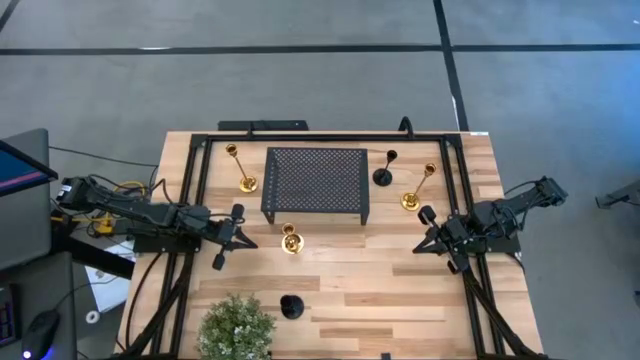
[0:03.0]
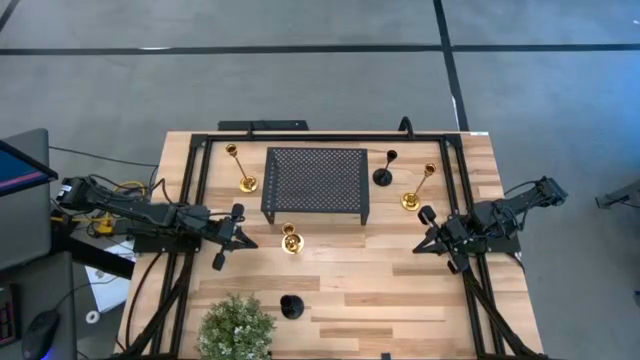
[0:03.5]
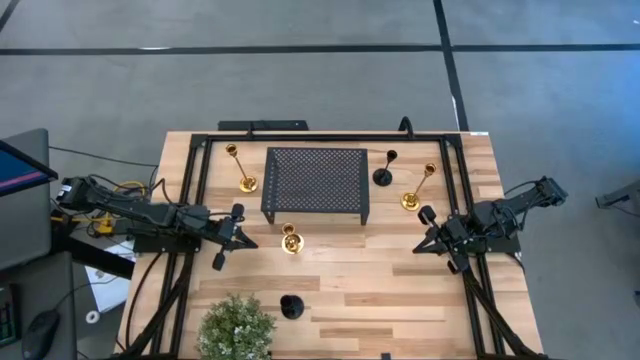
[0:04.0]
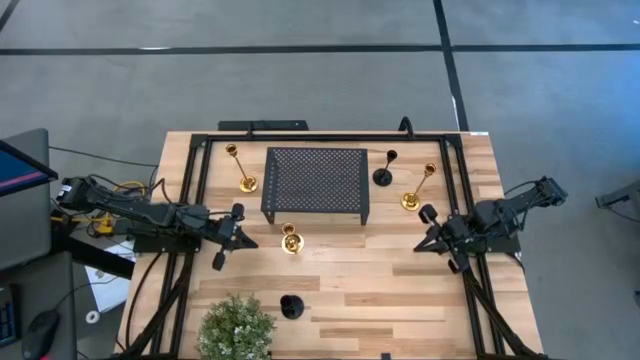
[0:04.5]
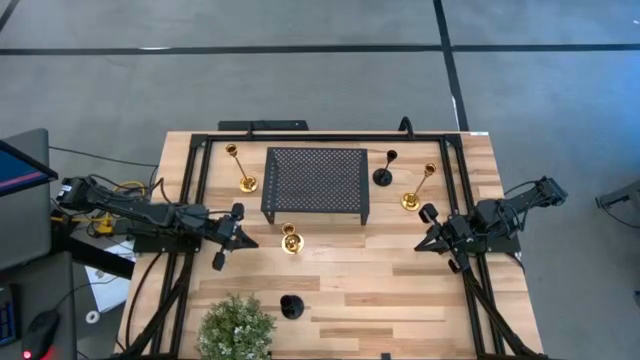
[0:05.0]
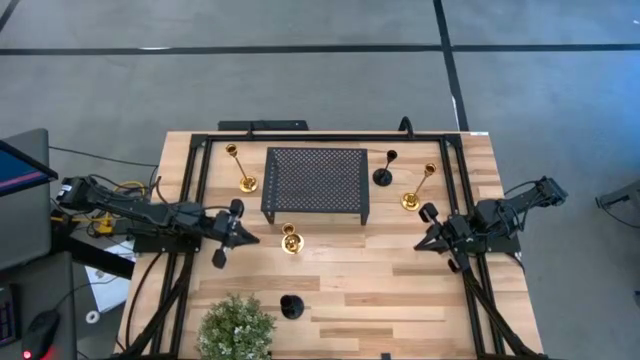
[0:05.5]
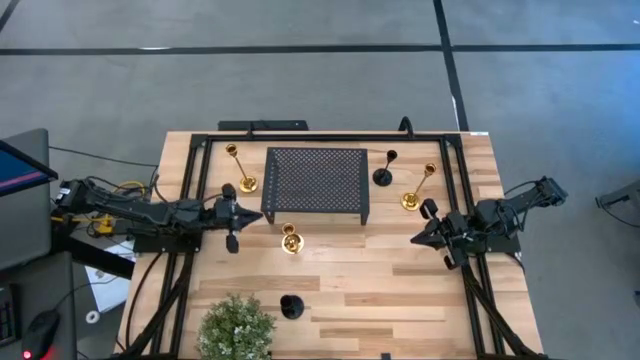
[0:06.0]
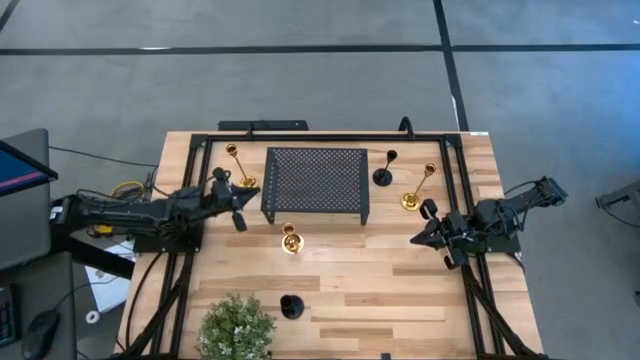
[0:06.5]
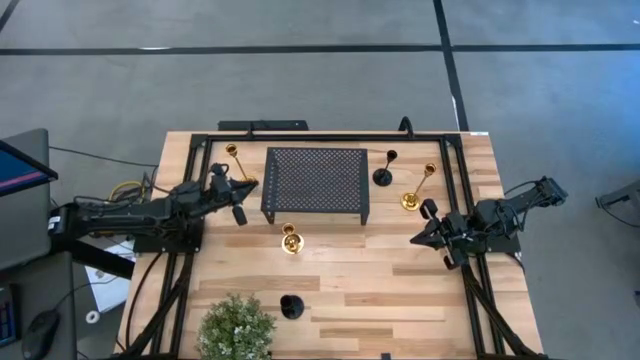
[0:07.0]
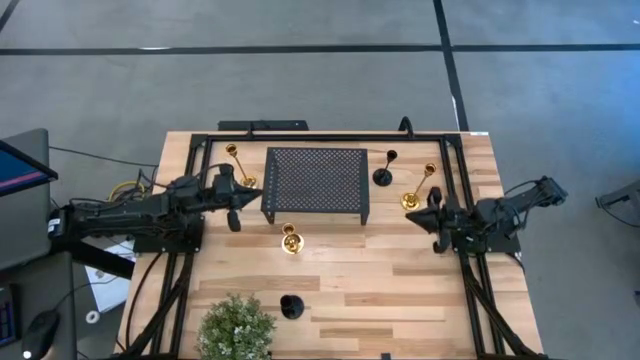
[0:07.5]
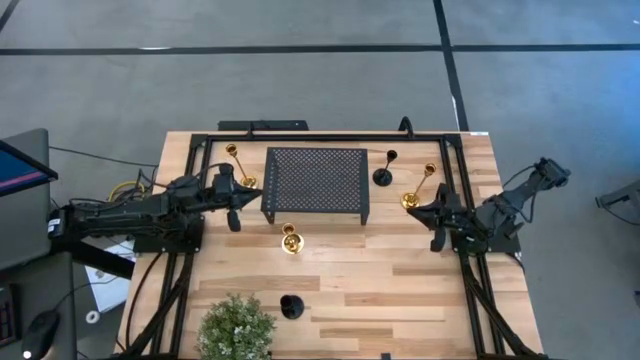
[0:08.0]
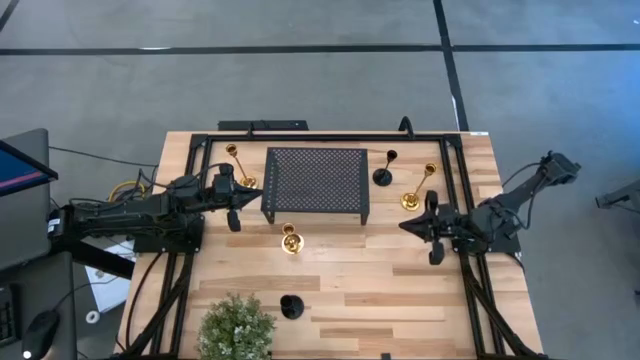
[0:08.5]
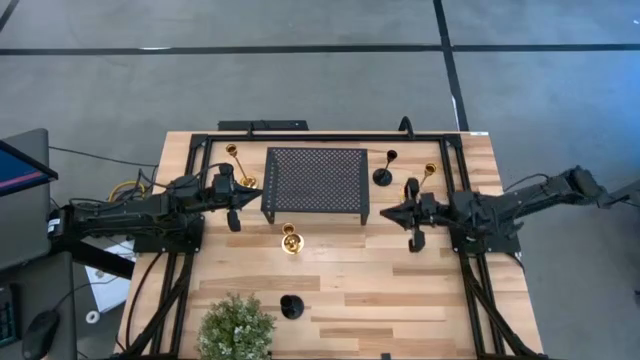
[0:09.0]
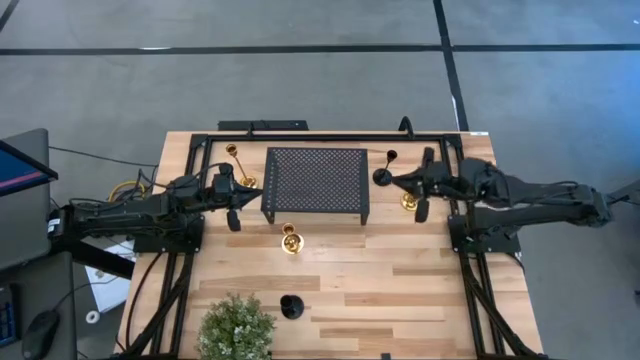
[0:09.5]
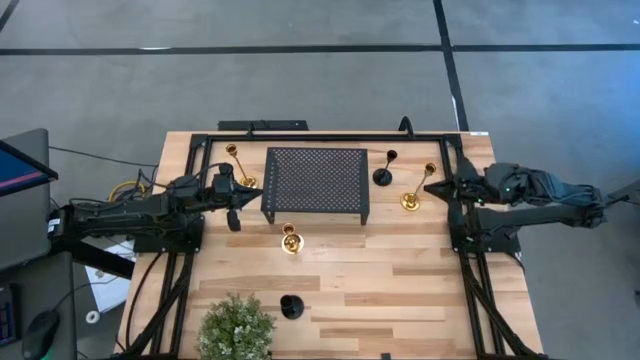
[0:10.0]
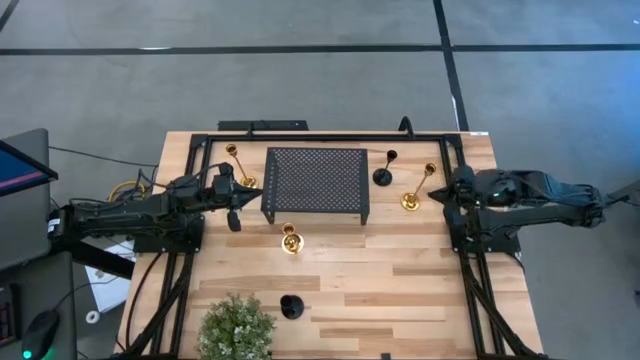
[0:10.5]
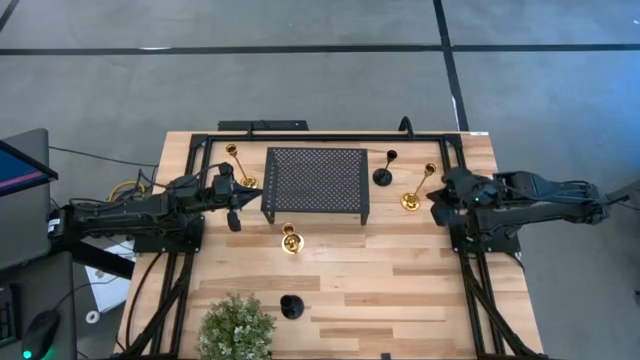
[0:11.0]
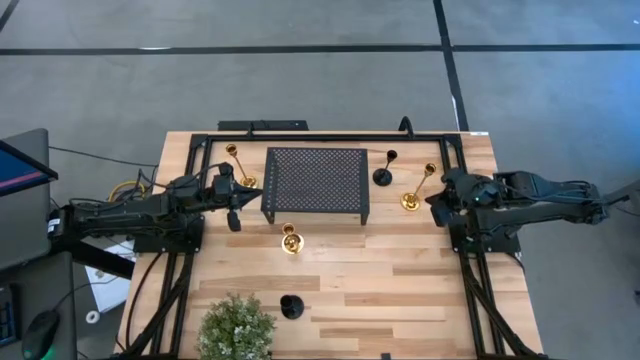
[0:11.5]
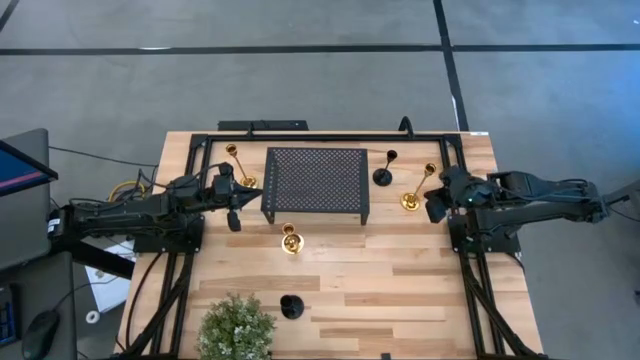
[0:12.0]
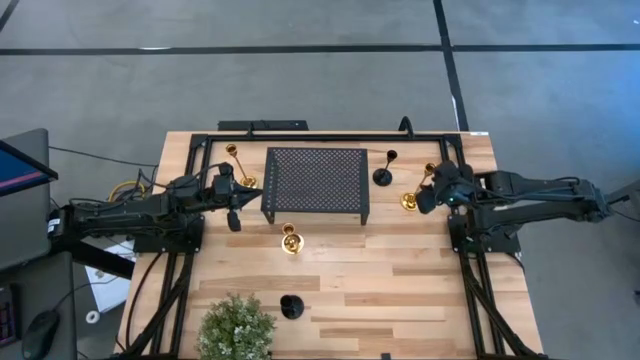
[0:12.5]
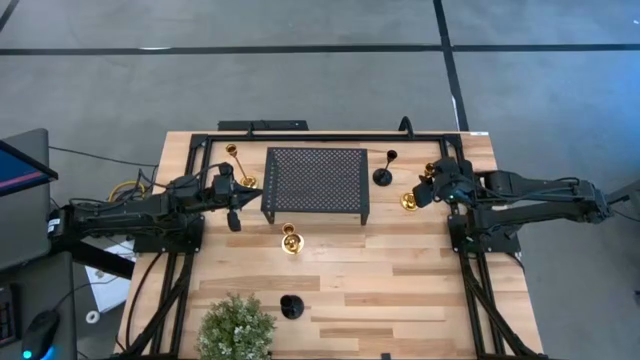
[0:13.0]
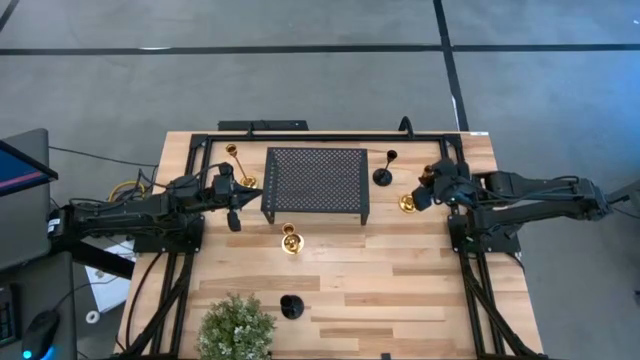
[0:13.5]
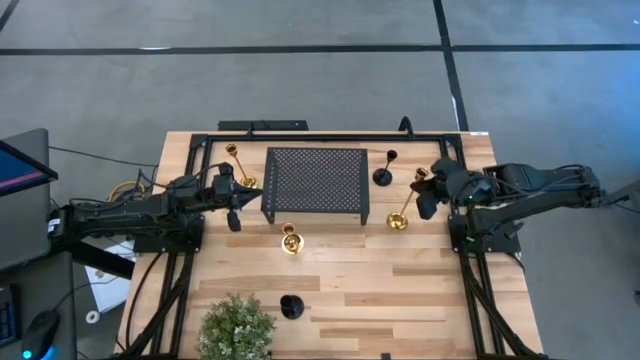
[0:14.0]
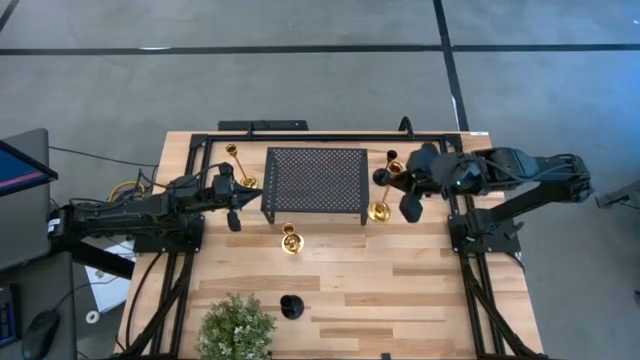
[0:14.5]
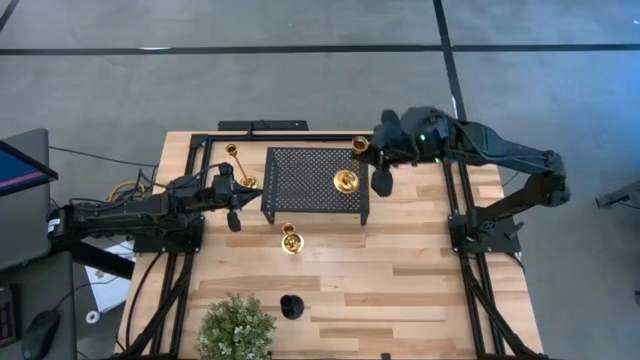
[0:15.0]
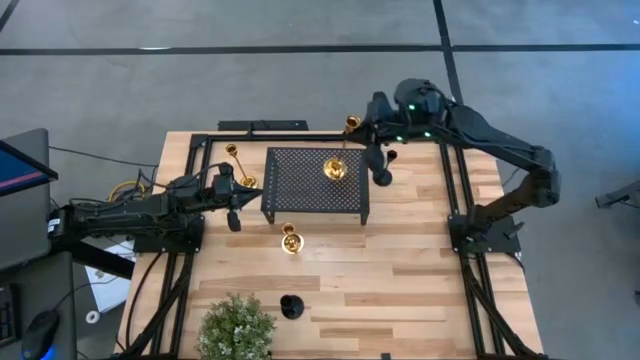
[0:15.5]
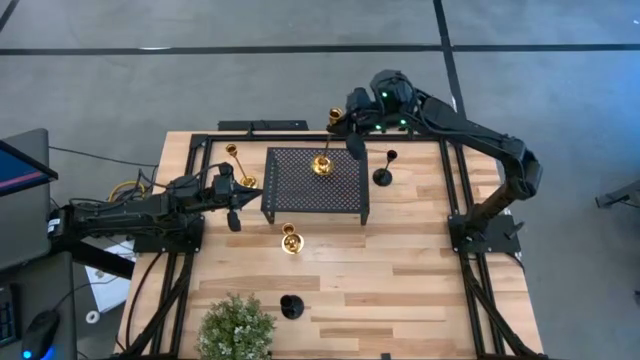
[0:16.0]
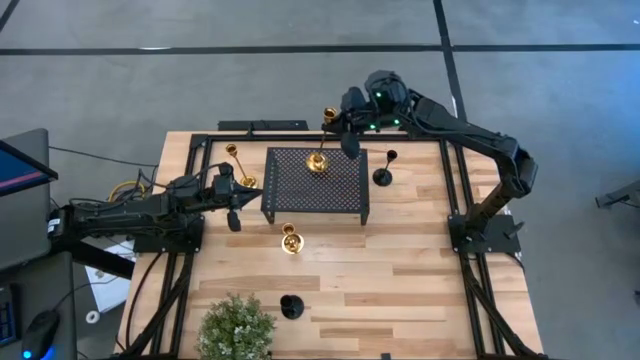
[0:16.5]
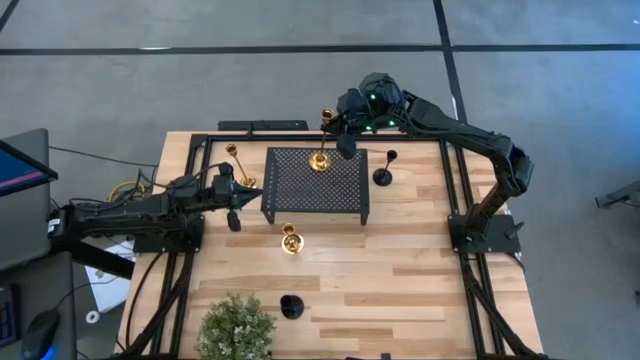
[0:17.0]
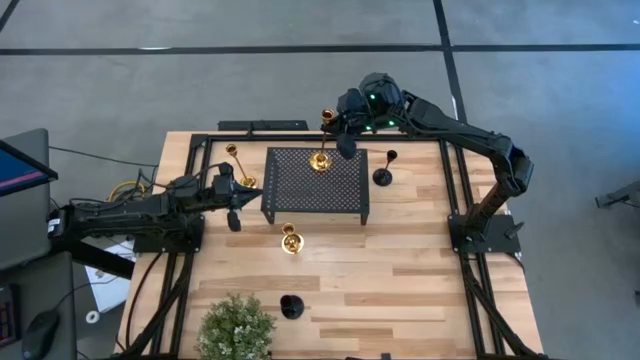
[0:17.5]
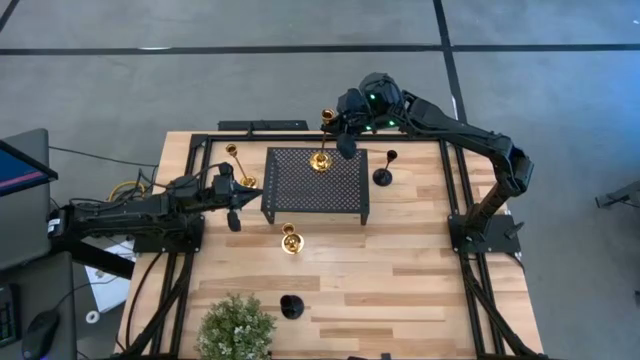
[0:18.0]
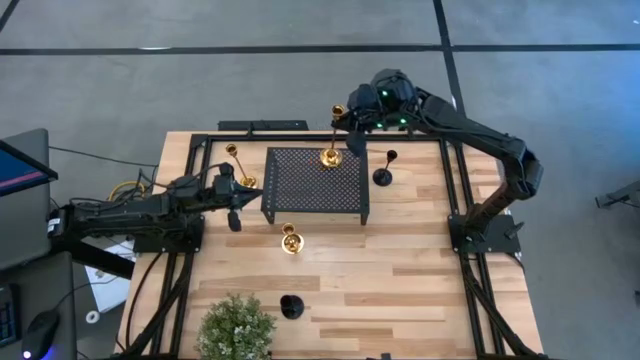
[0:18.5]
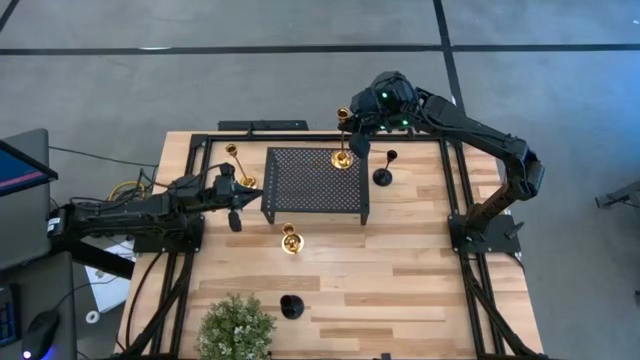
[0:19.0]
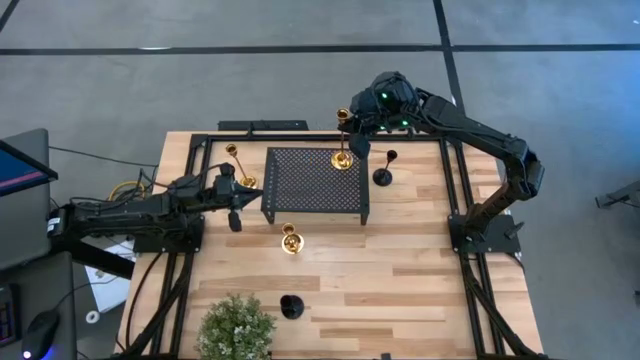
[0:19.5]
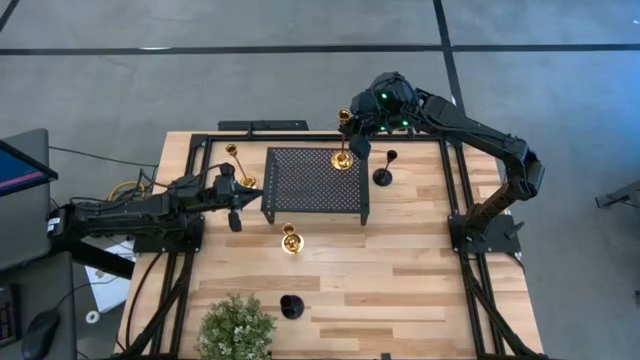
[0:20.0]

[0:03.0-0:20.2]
Task: Pick & Place candle stick holders
Put the right large gold candle holder on the shelf

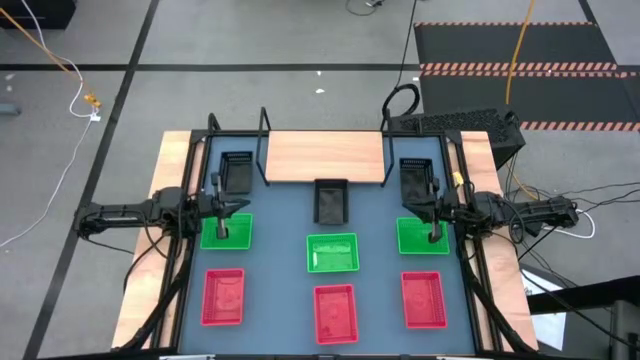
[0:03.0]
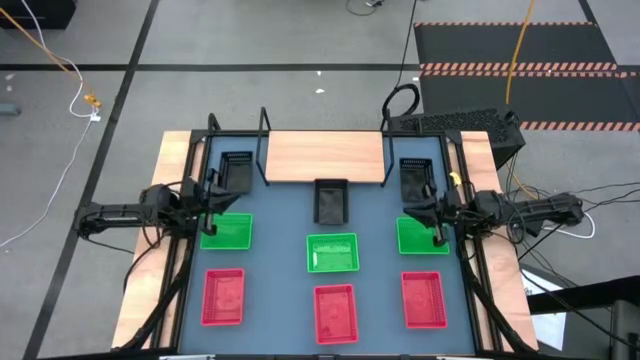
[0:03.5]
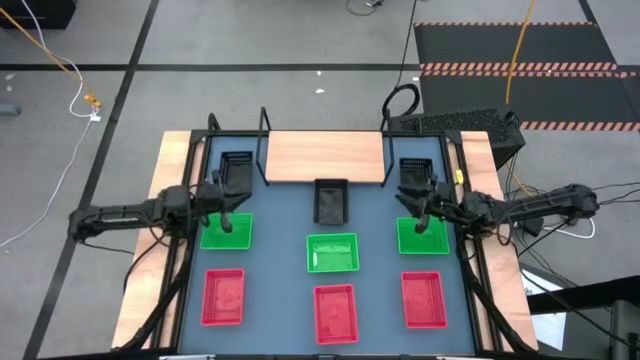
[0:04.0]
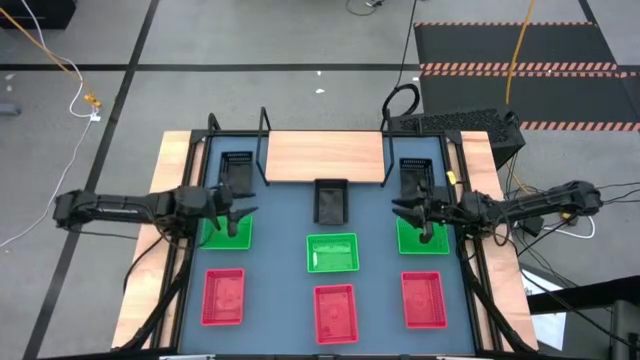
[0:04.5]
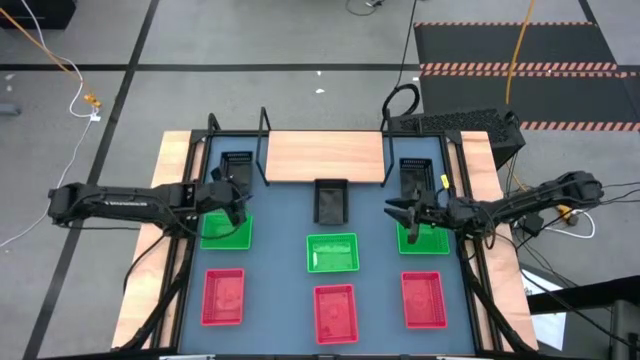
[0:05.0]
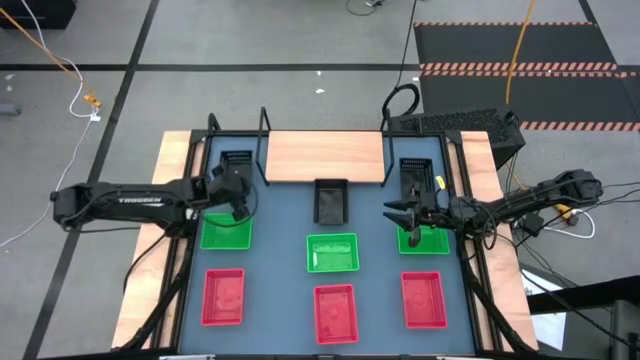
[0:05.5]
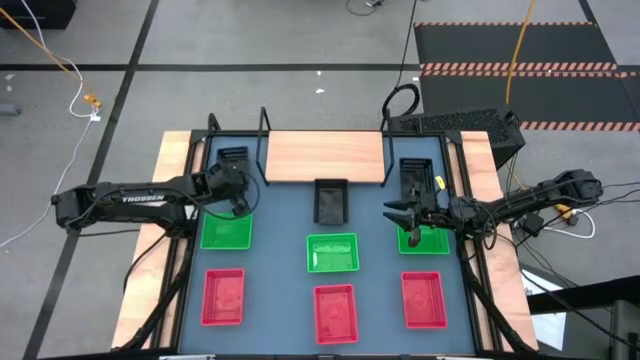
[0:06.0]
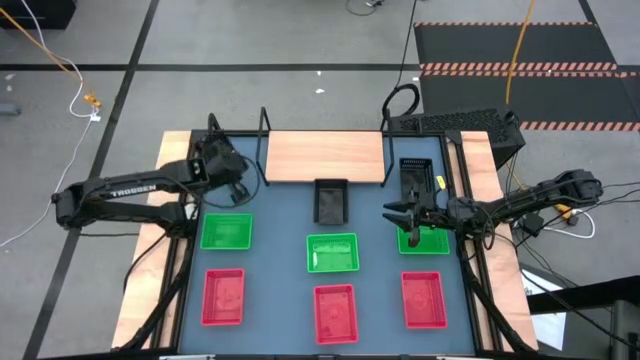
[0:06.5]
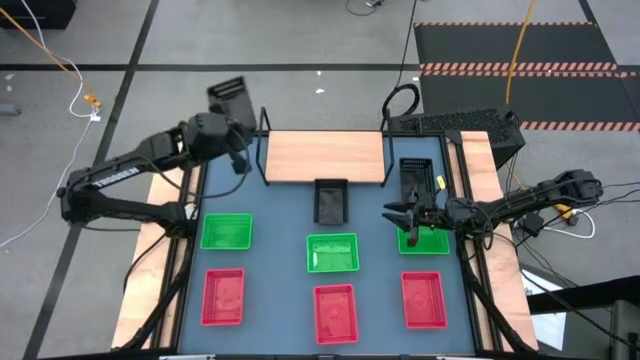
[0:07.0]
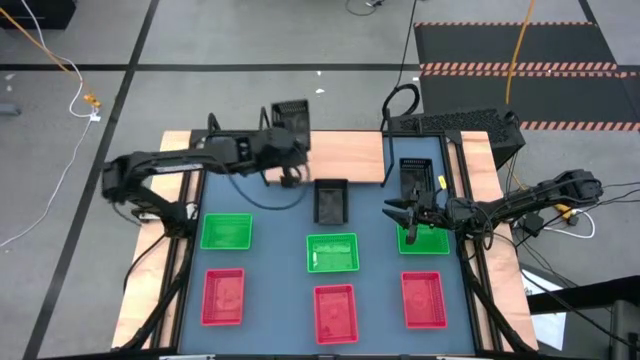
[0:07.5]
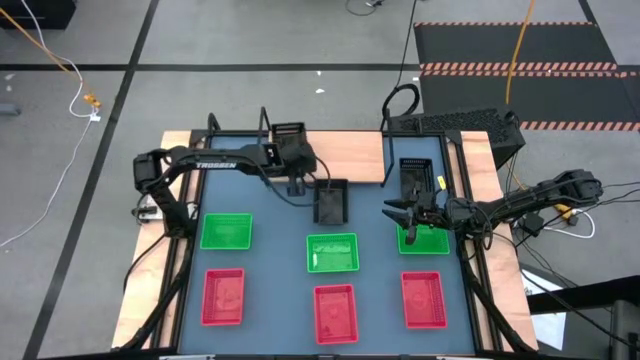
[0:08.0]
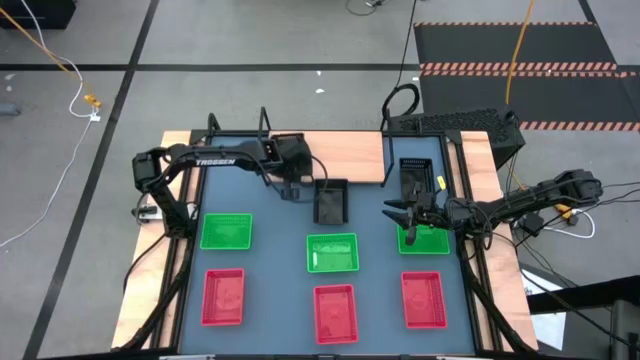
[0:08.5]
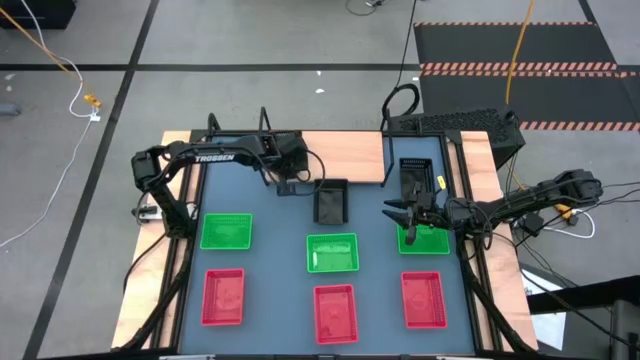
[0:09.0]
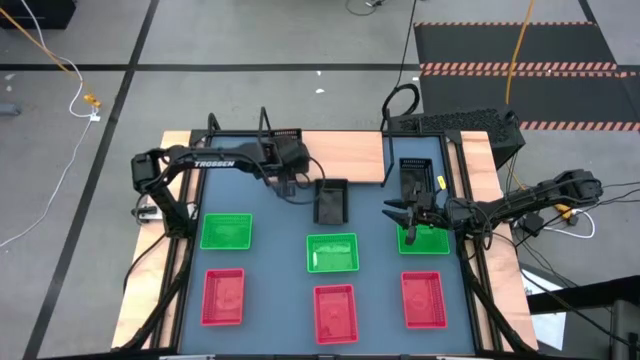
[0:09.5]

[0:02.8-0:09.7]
Task: Stack baskets on shelf by color
Put the top left black bin on the shelf
